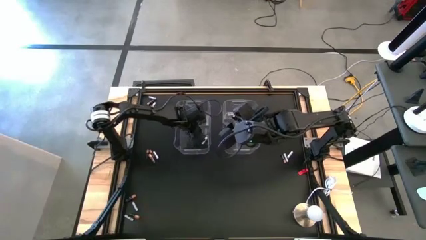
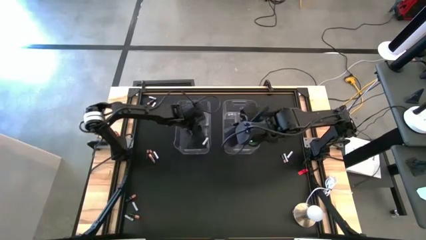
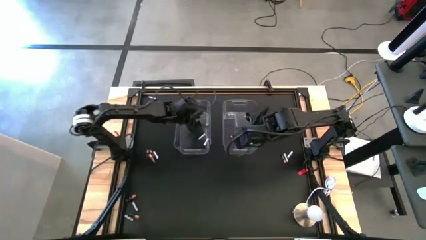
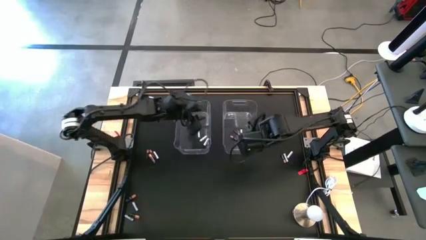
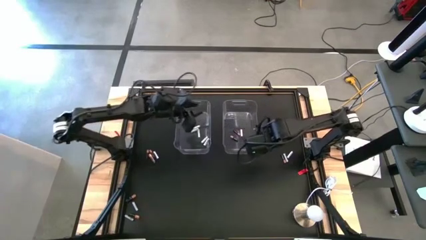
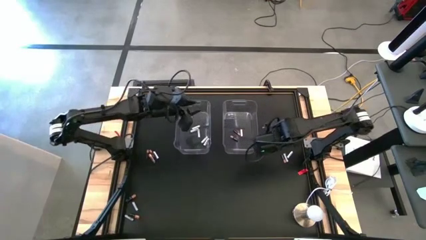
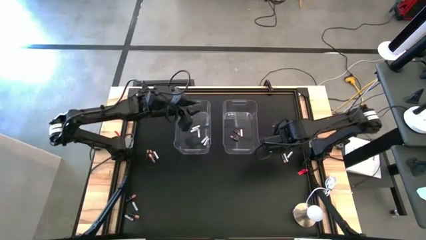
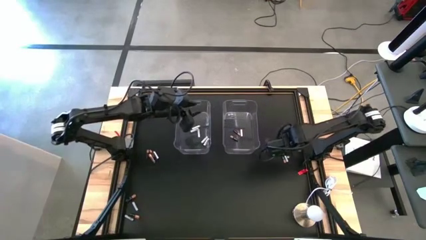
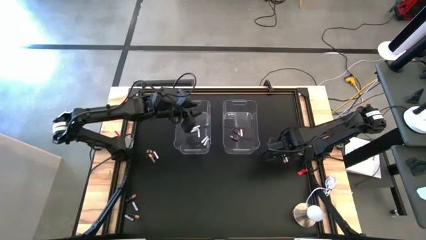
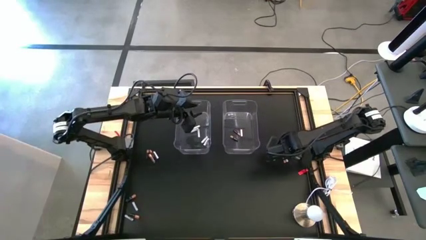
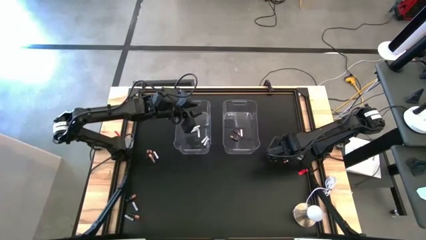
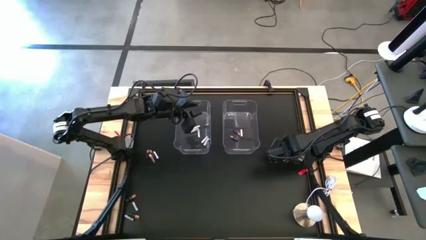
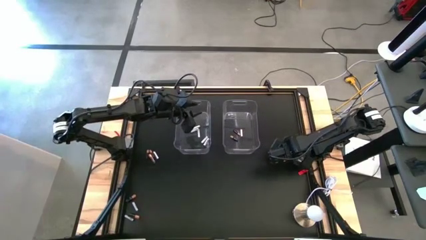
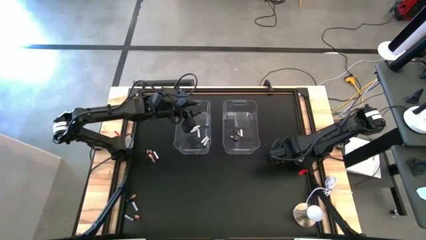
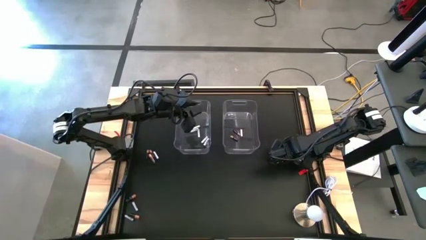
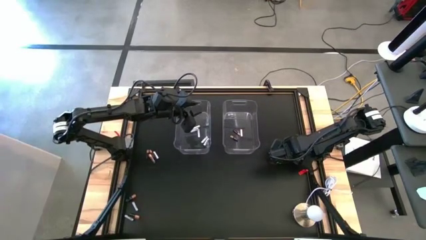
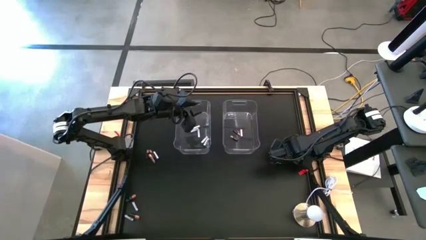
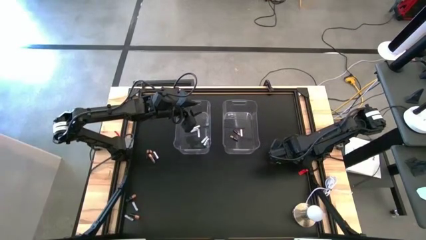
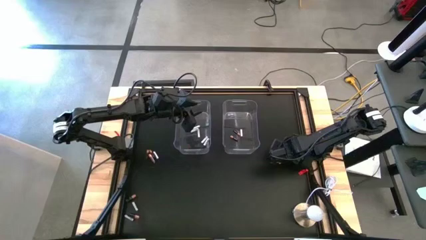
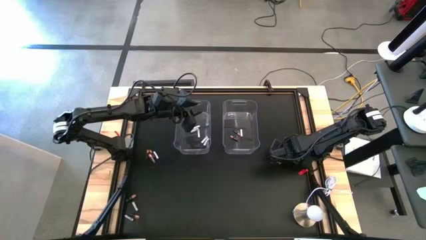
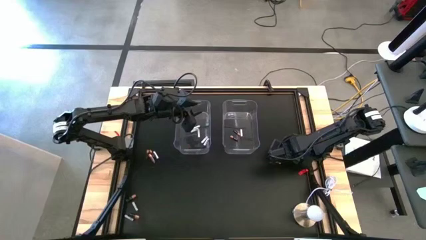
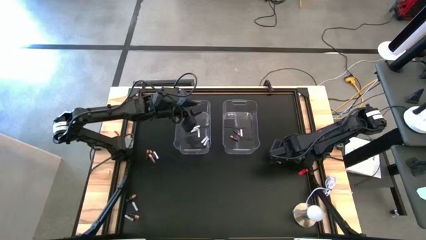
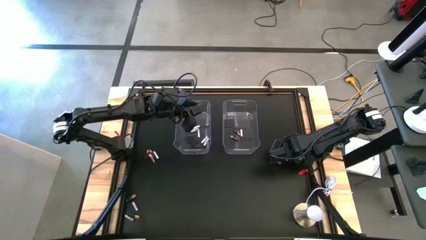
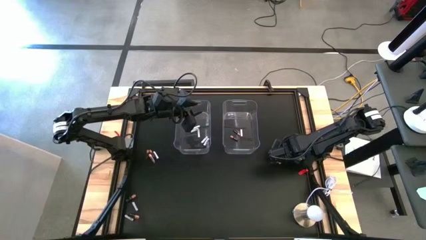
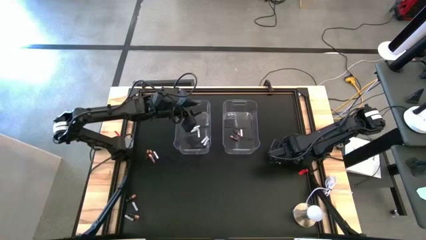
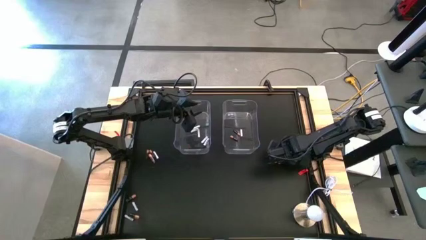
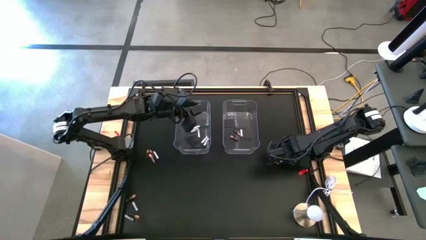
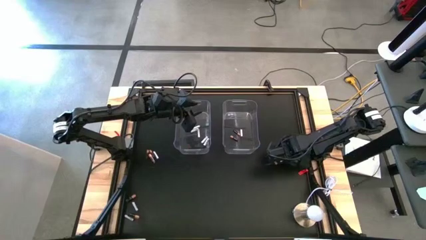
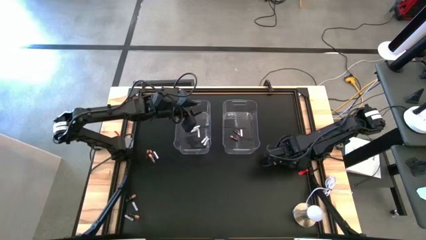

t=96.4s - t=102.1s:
Task: Sort batteries
Put the white battery into the left transparent bin

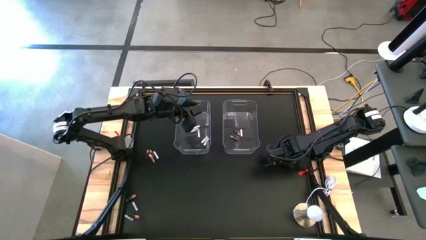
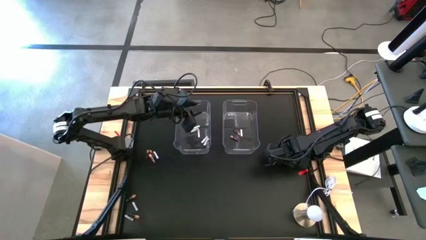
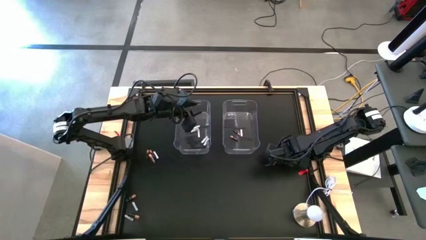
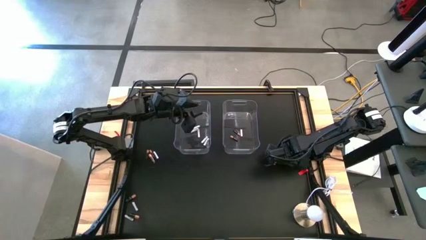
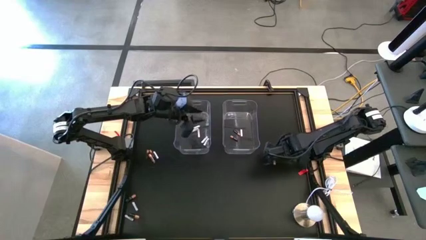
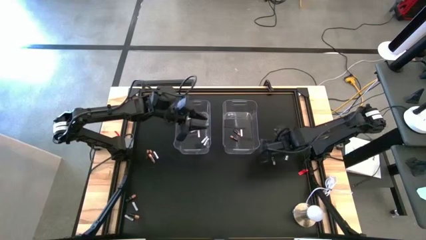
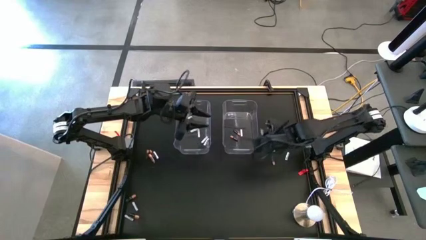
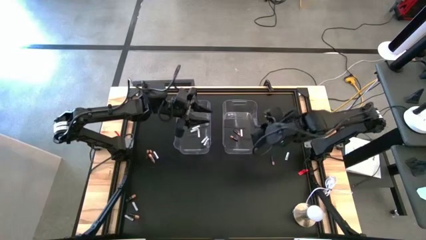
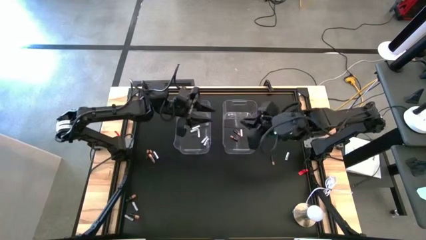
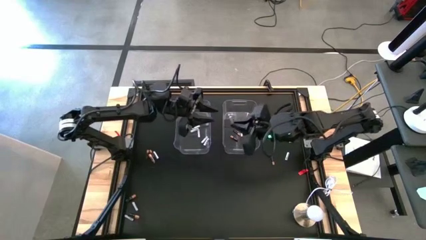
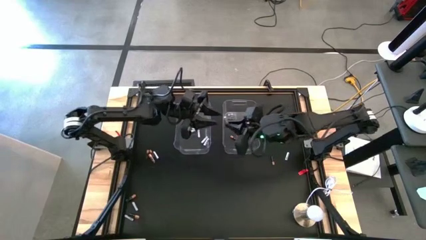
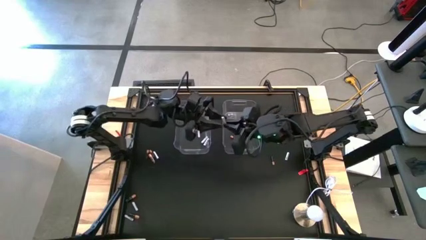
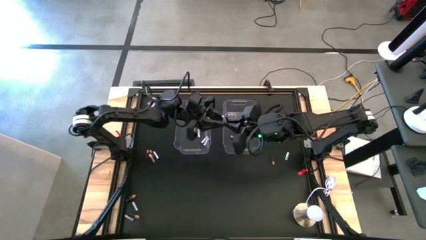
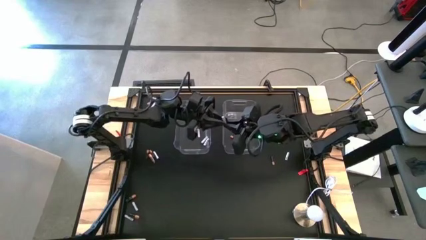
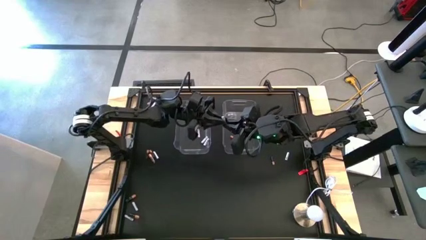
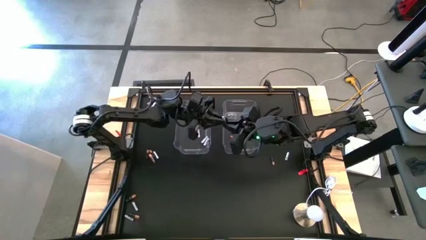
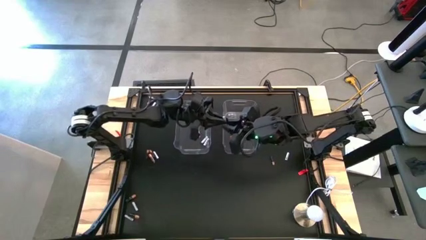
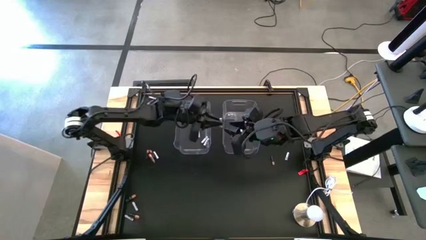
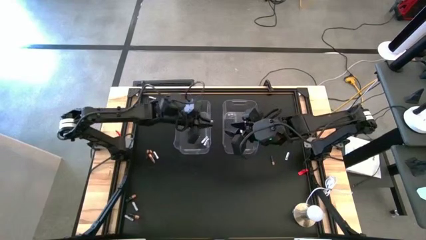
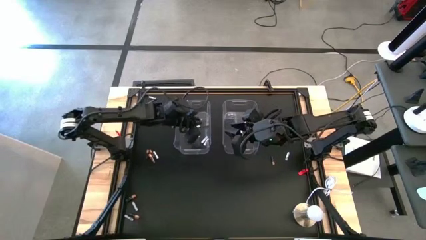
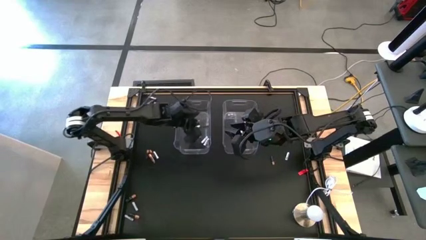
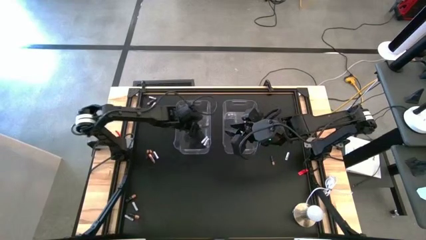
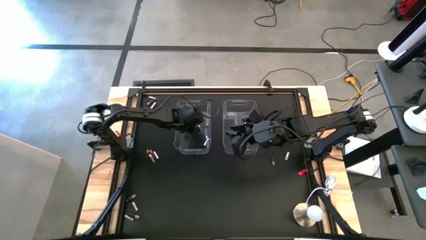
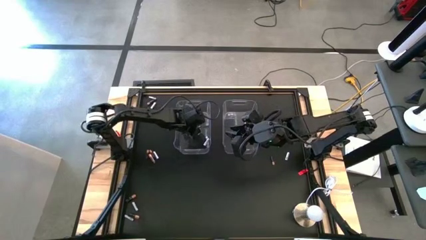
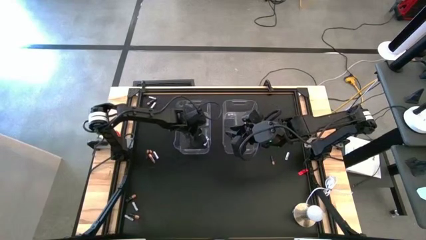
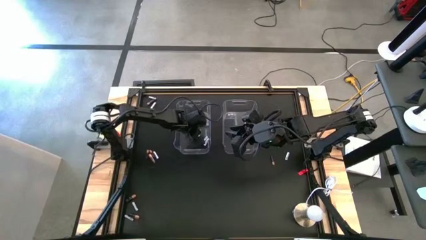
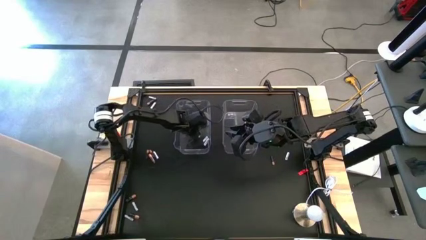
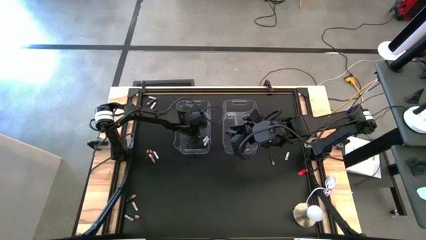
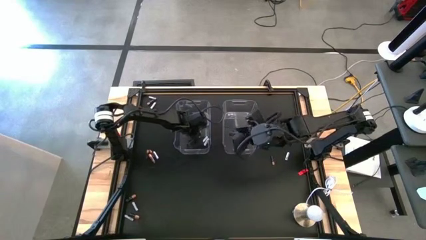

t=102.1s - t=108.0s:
Put the white battery into the left transparent bin
